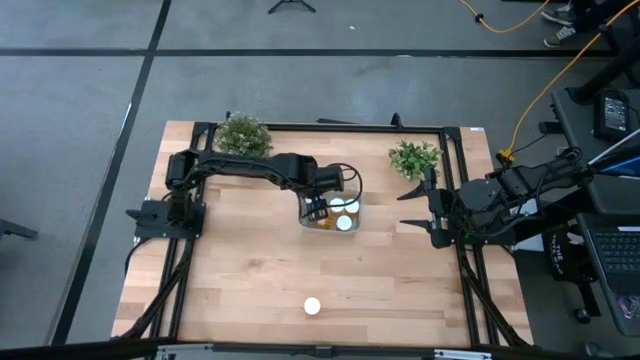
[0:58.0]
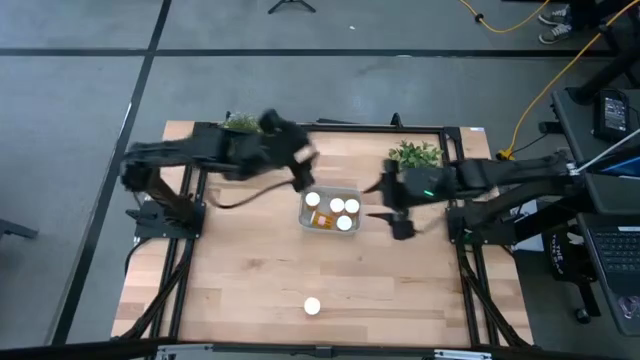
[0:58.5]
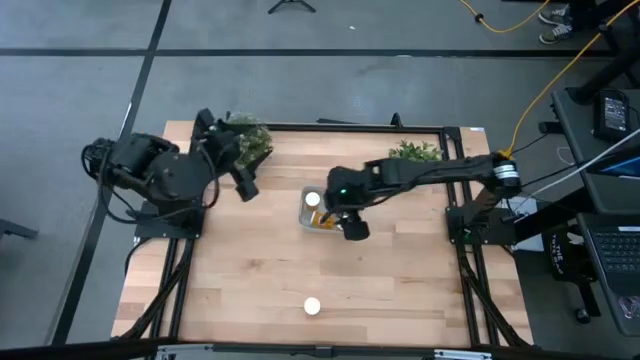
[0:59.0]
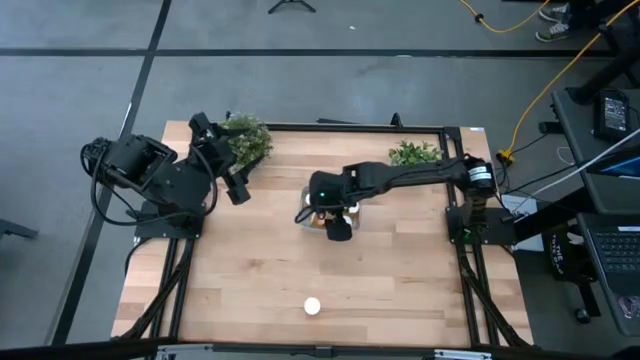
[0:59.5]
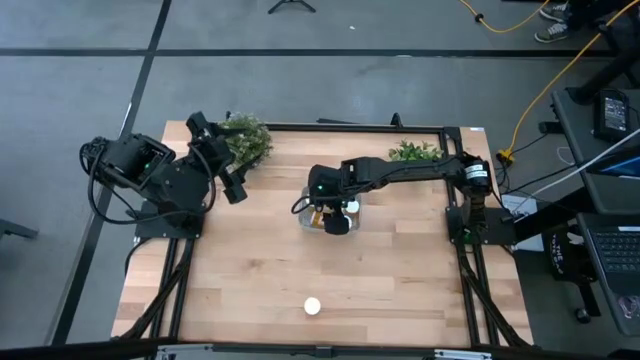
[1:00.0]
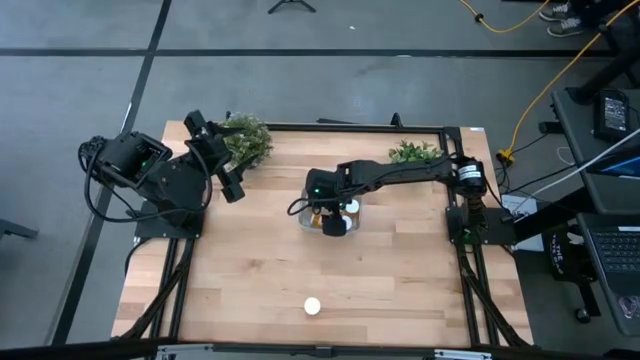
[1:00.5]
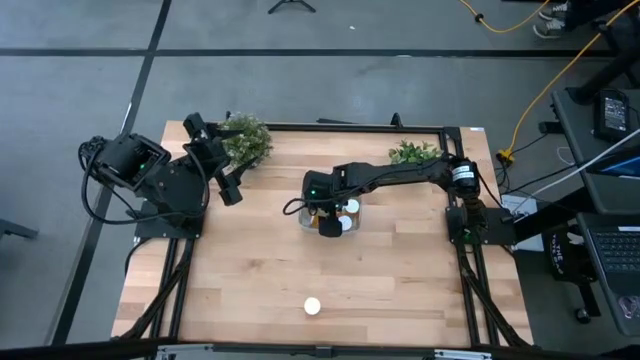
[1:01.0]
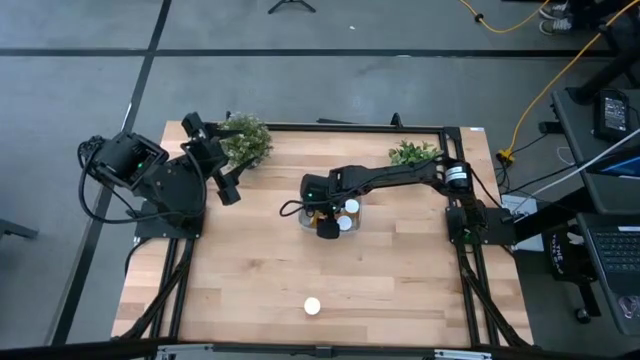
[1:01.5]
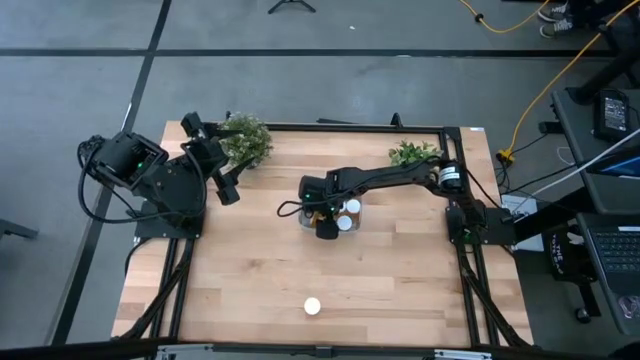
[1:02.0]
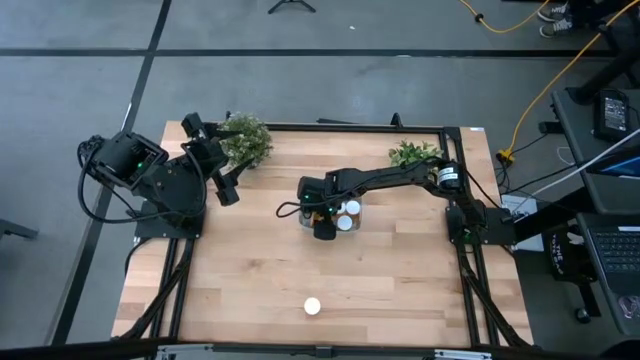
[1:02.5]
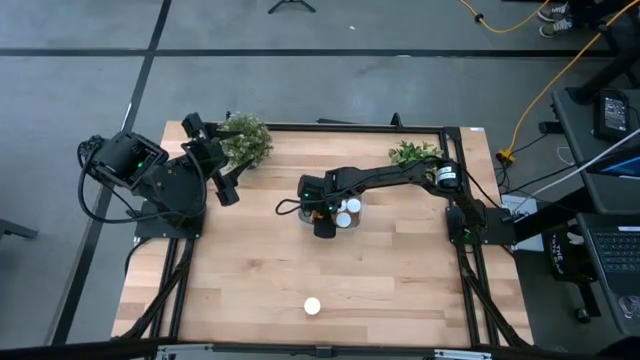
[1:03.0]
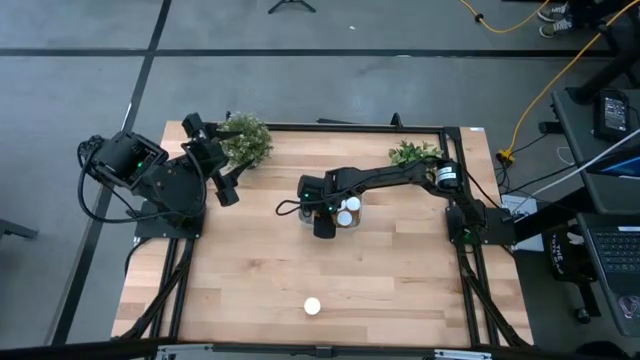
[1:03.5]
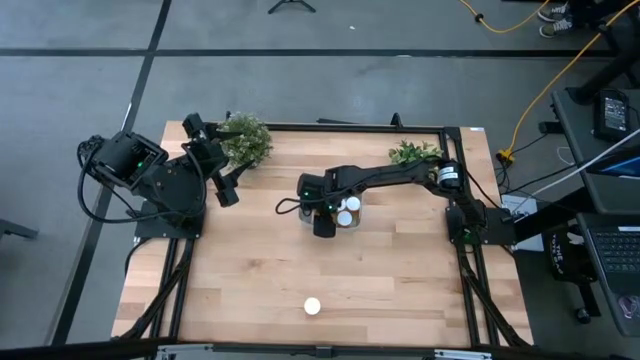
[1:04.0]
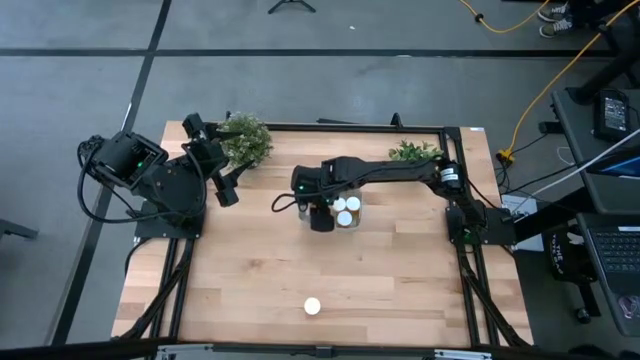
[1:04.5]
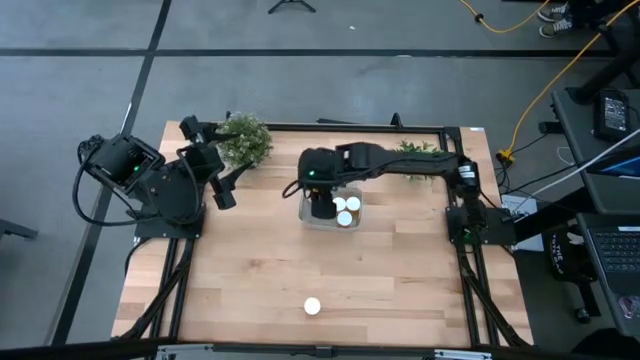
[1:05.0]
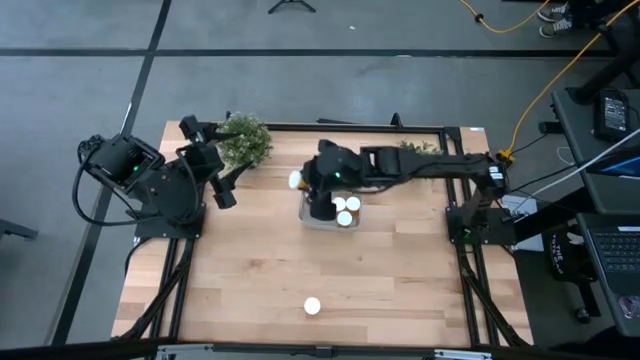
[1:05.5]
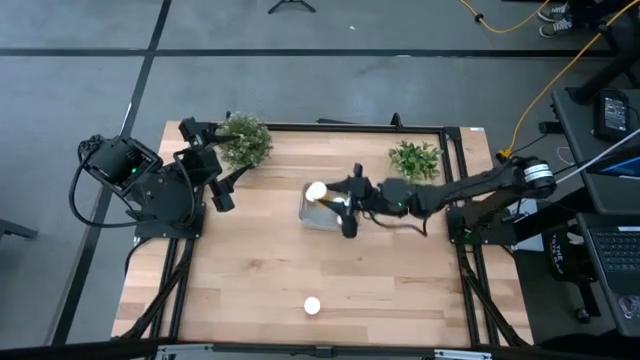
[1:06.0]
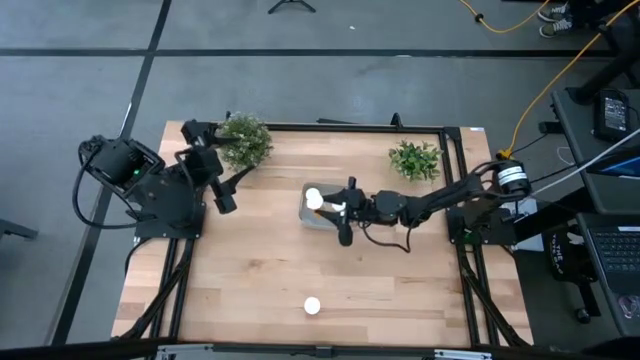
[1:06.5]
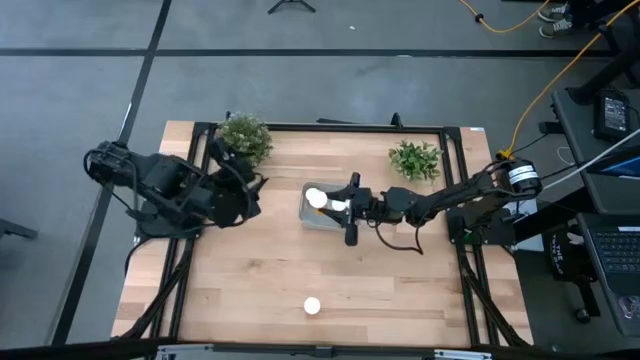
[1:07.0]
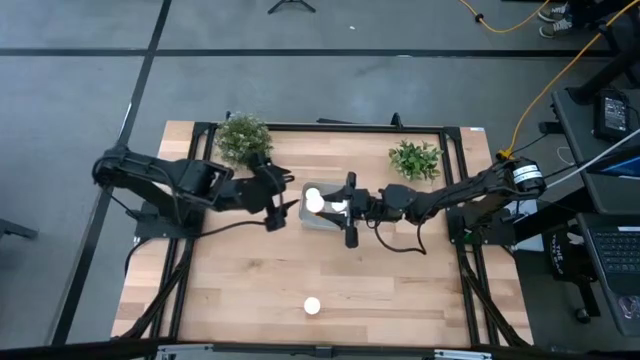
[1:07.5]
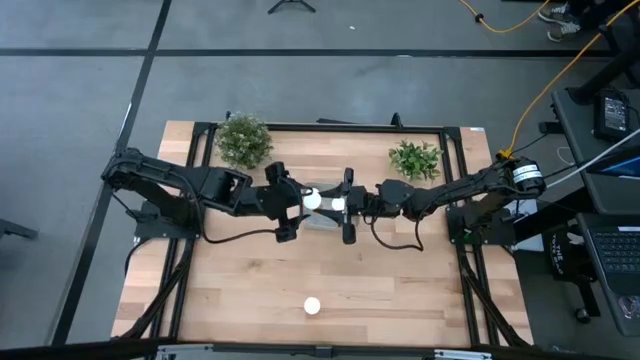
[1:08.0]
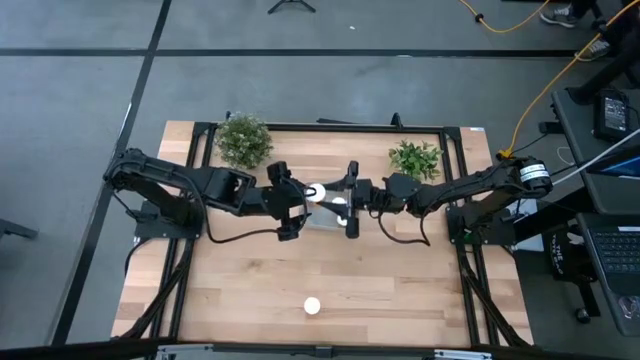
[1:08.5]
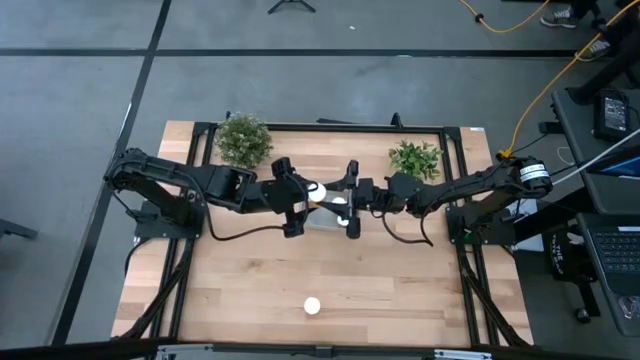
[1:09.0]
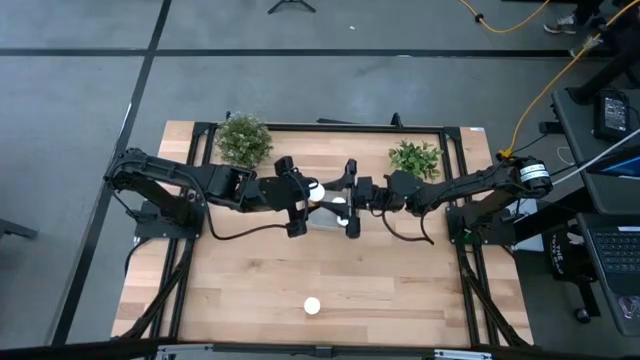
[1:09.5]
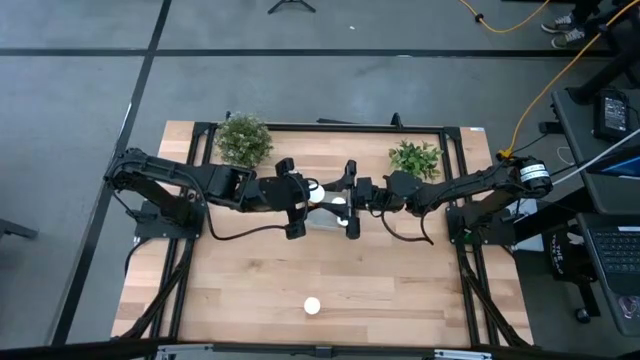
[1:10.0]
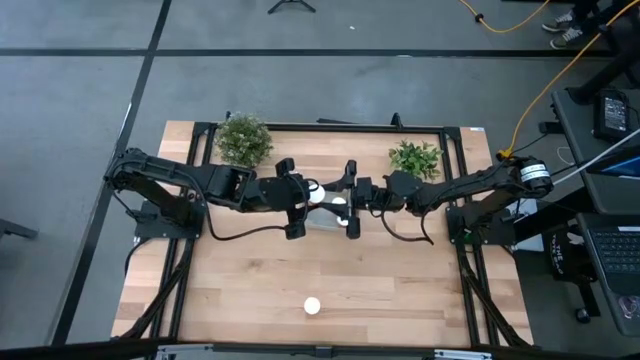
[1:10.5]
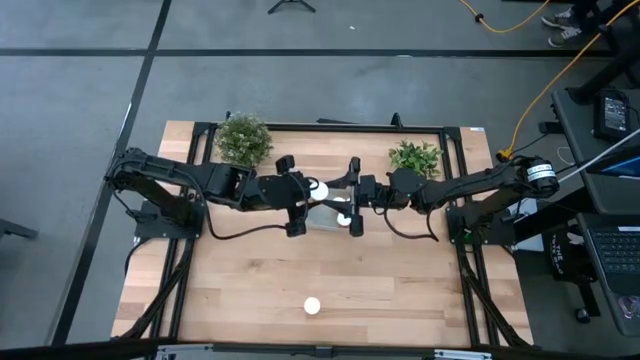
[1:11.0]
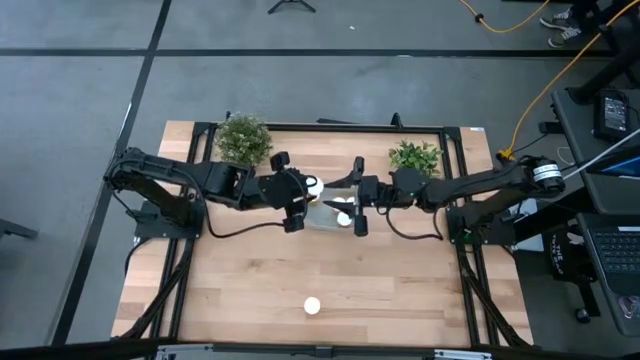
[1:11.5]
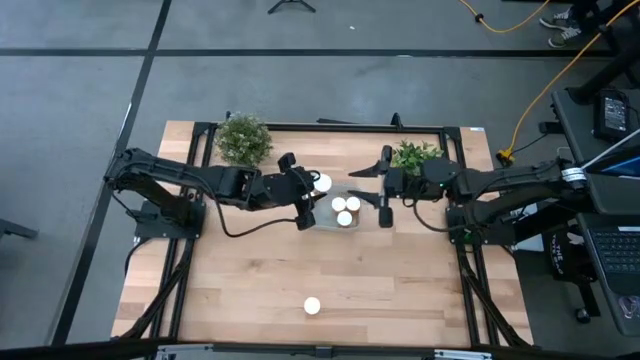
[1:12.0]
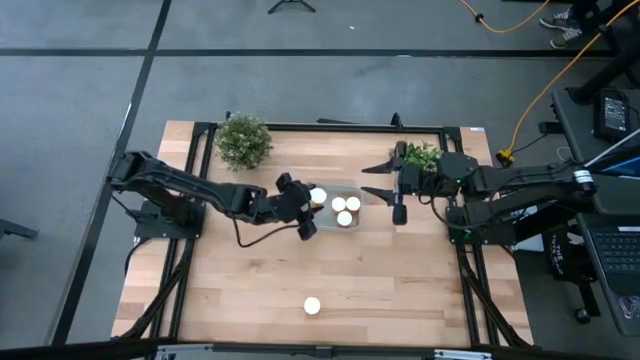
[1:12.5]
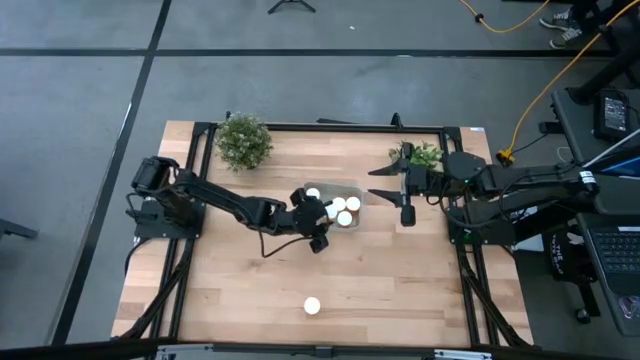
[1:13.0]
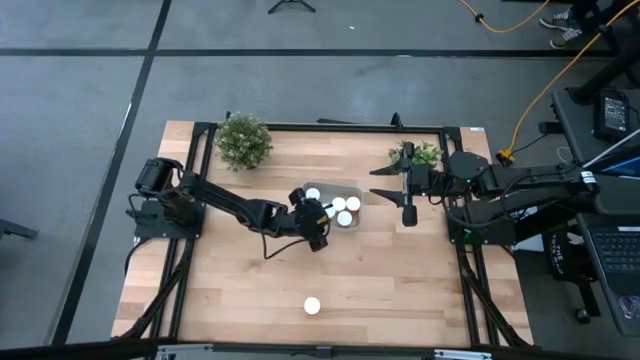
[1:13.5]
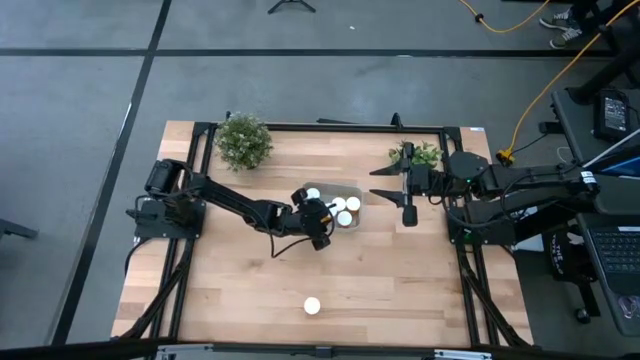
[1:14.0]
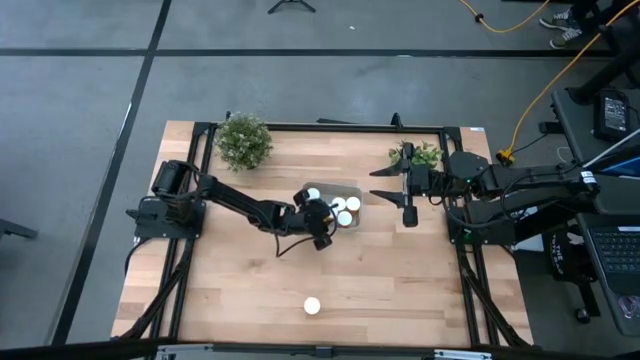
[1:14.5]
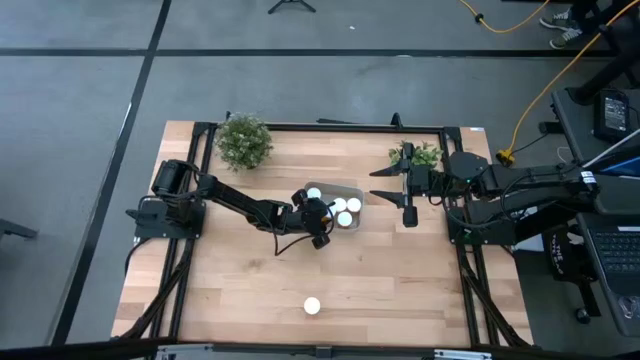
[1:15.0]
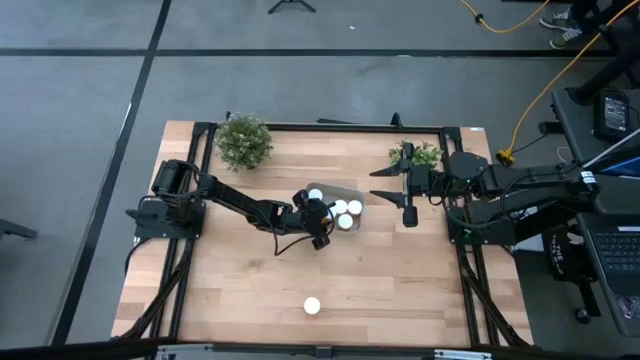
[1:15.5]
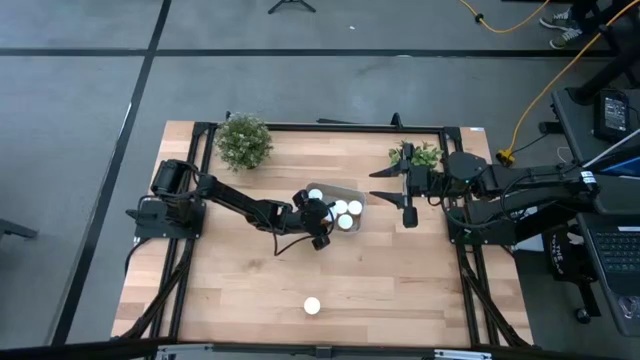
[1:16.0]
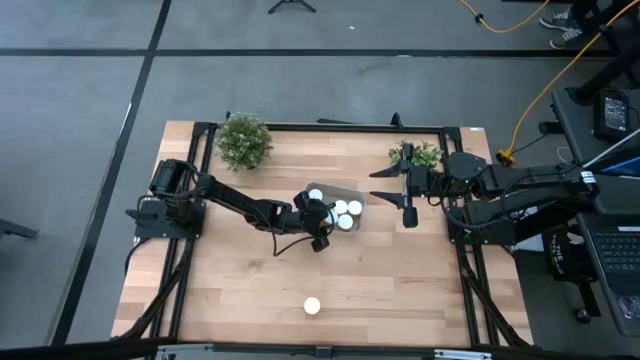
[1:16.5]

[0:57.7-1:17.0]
Task: Pick and place pill bottles into a basket
Adjust the orange pill bottle in the gray bin

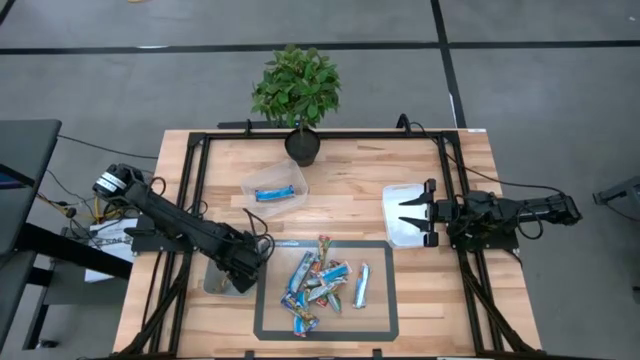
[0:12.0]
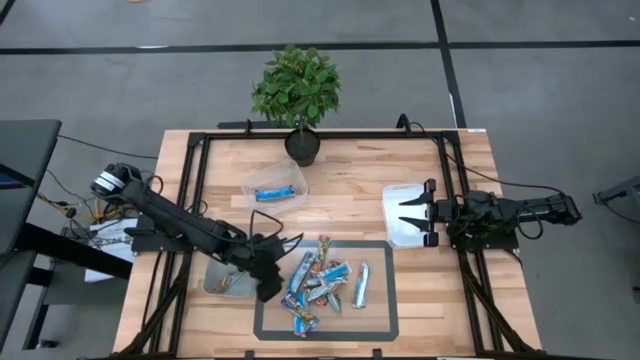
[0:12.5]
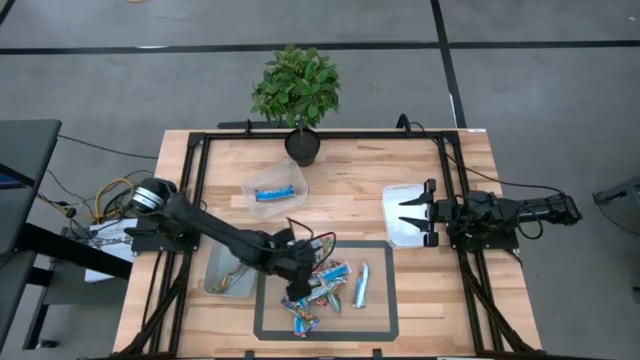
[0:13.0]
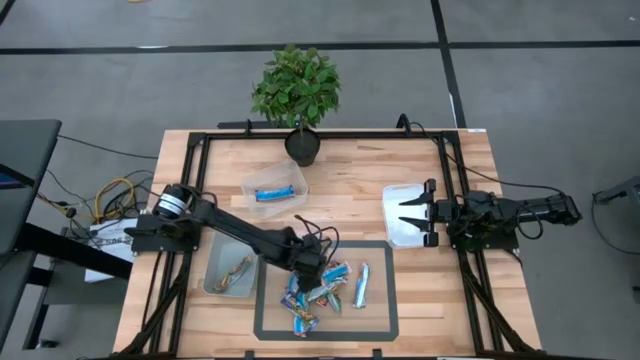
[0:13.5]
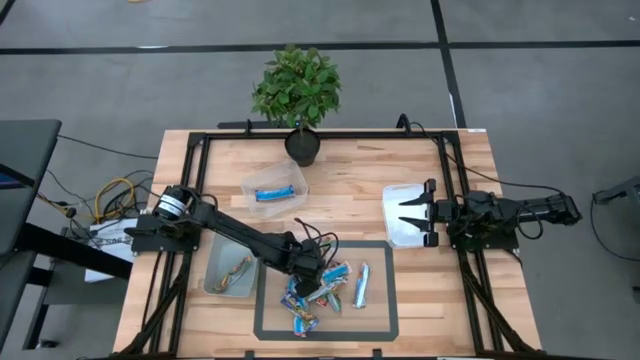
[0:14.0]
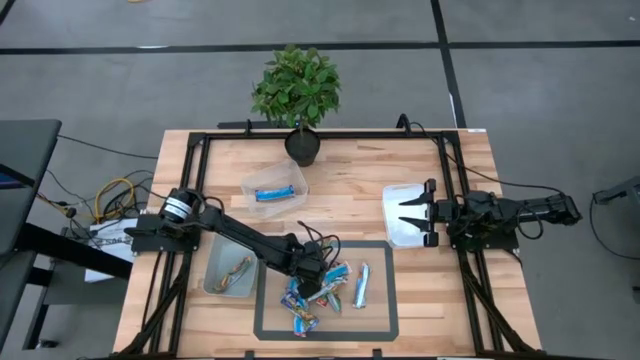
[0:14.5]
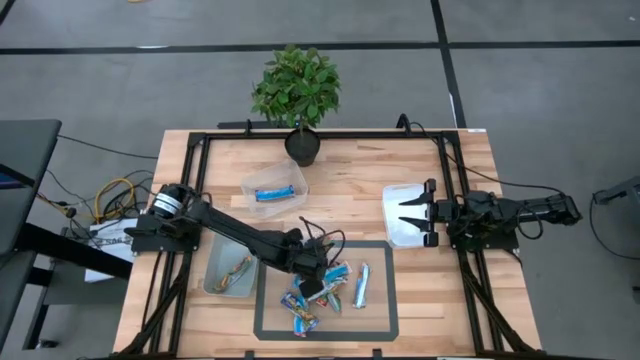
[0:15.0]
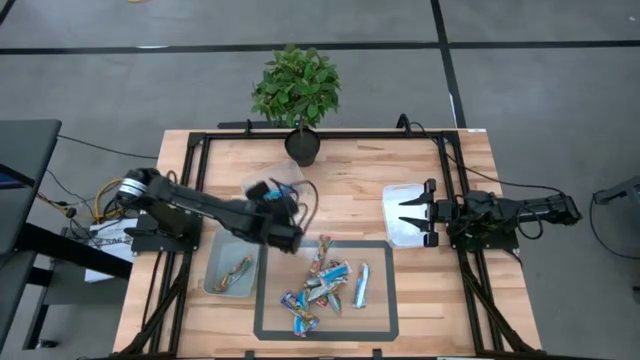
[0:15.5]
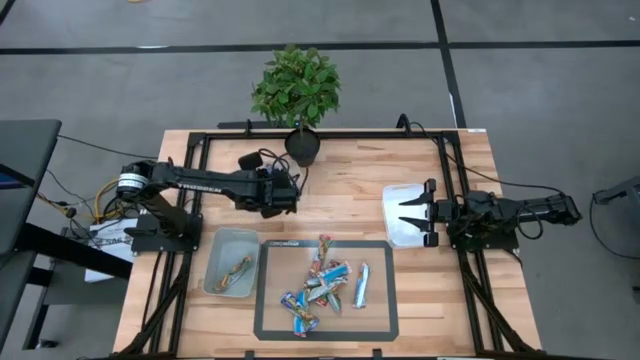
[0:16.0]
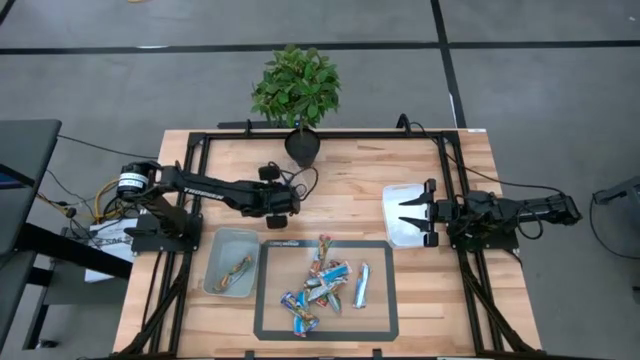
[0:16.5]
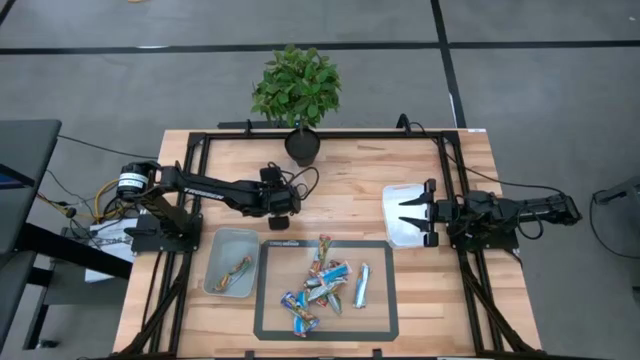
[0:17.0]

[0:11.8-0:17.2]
Task: Pick and place Granola Bars by type
Put the blue granola bar into the transparent bin
